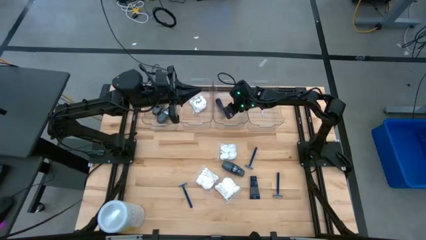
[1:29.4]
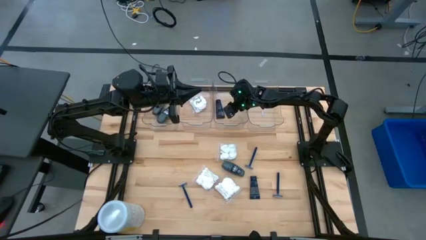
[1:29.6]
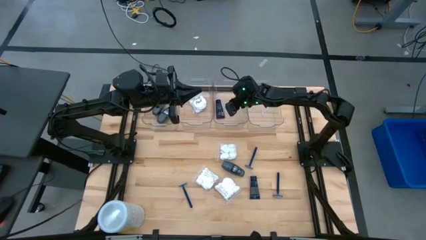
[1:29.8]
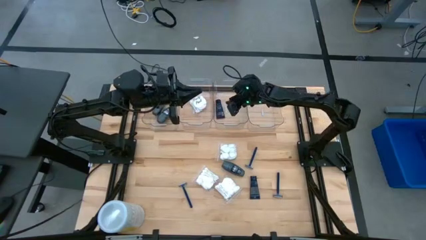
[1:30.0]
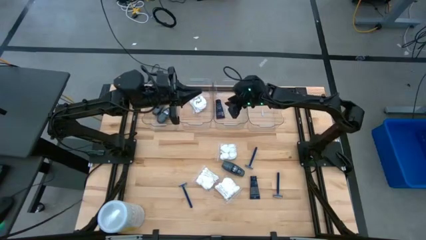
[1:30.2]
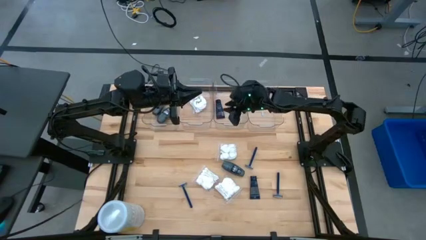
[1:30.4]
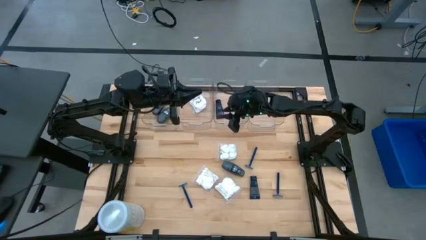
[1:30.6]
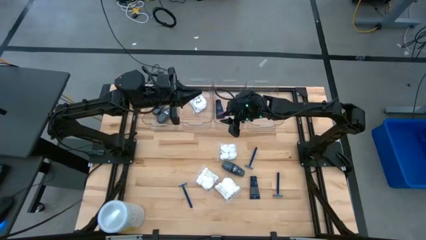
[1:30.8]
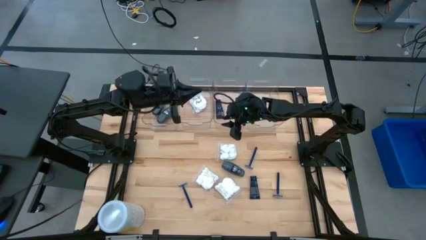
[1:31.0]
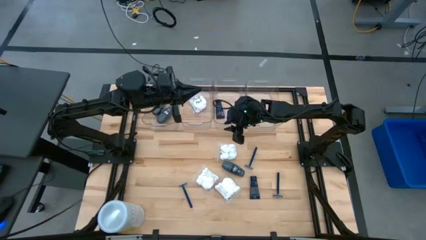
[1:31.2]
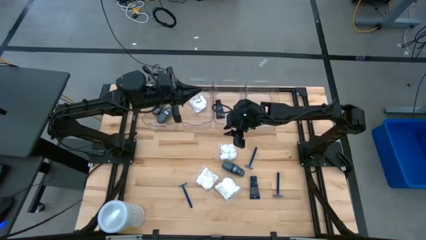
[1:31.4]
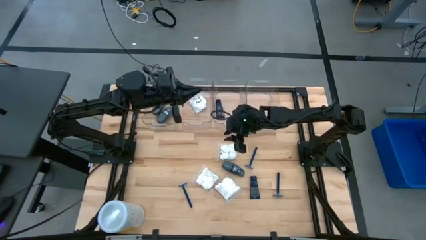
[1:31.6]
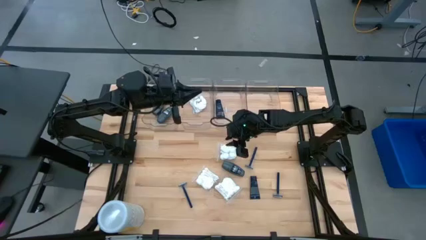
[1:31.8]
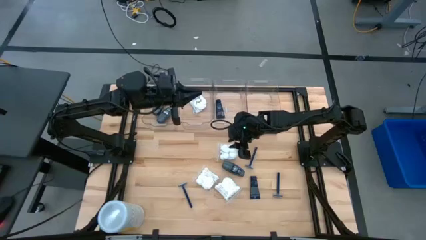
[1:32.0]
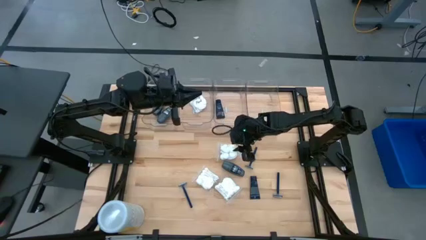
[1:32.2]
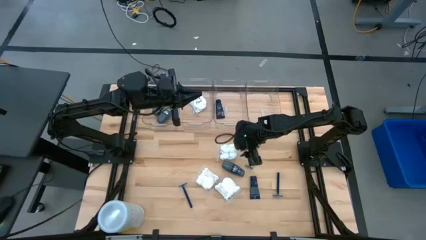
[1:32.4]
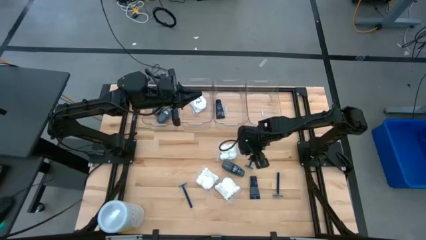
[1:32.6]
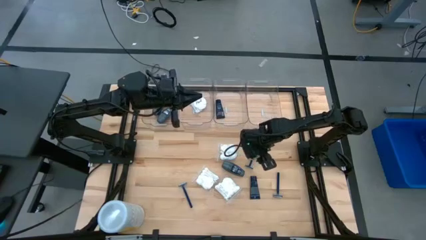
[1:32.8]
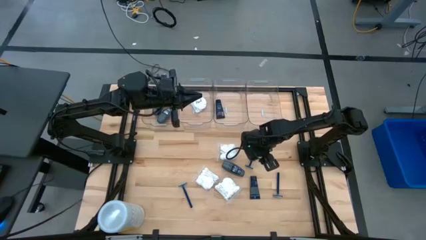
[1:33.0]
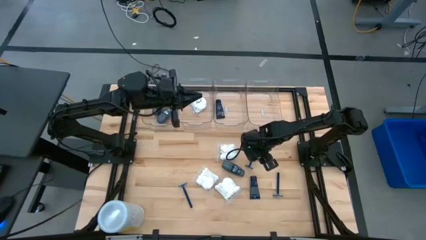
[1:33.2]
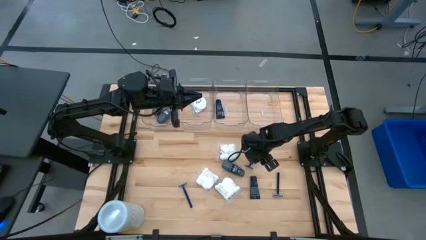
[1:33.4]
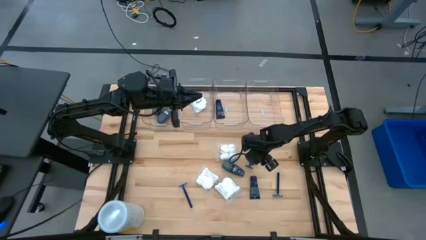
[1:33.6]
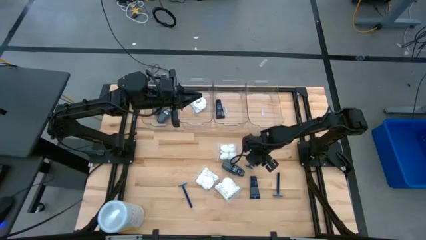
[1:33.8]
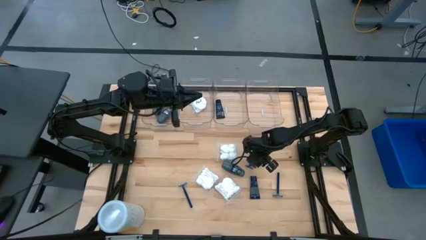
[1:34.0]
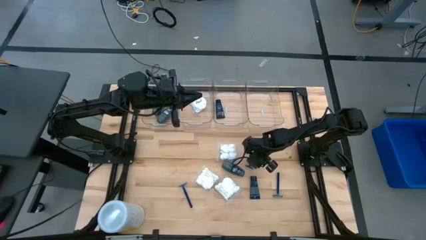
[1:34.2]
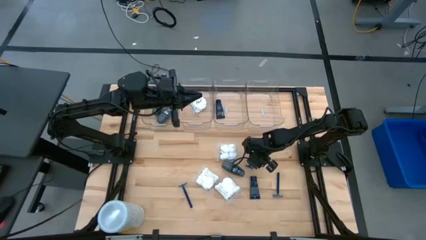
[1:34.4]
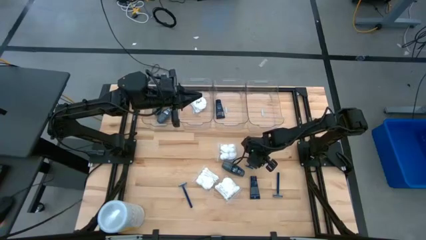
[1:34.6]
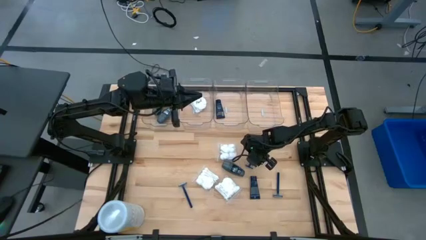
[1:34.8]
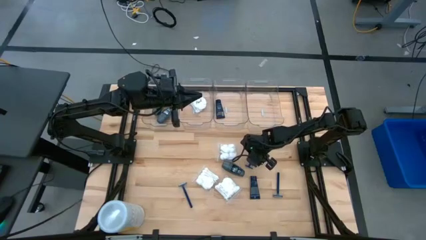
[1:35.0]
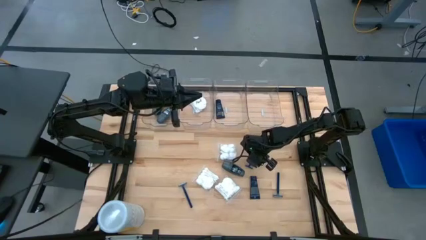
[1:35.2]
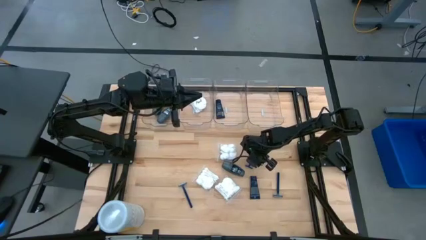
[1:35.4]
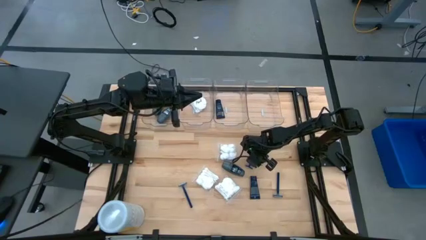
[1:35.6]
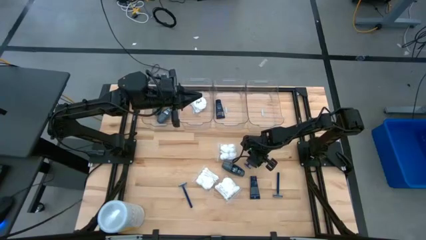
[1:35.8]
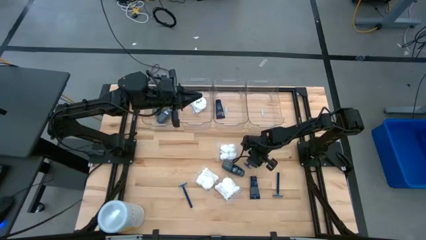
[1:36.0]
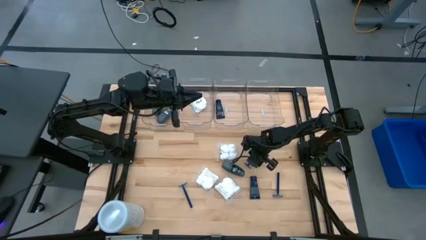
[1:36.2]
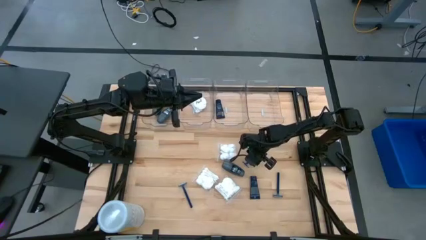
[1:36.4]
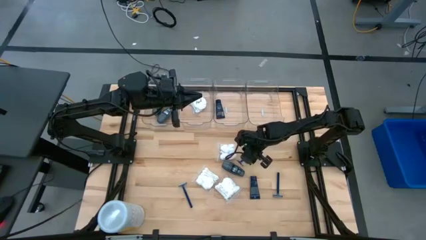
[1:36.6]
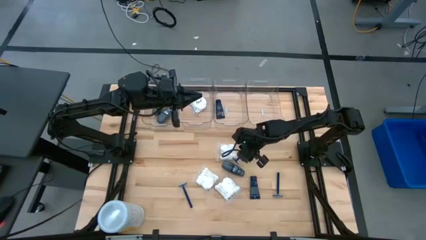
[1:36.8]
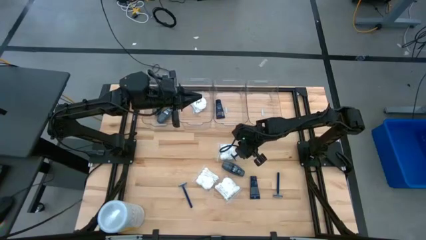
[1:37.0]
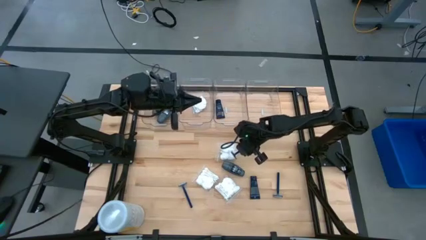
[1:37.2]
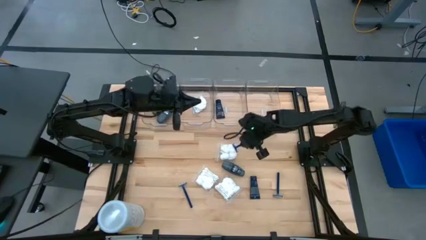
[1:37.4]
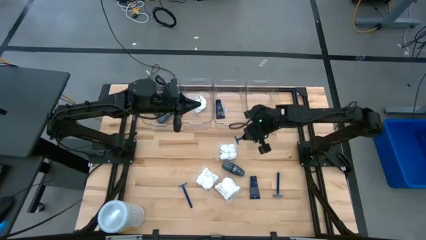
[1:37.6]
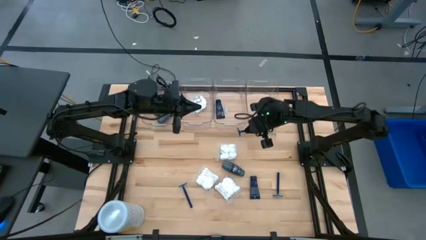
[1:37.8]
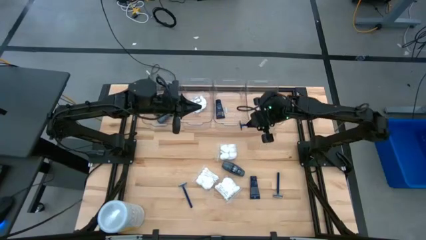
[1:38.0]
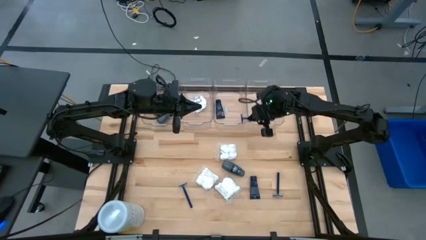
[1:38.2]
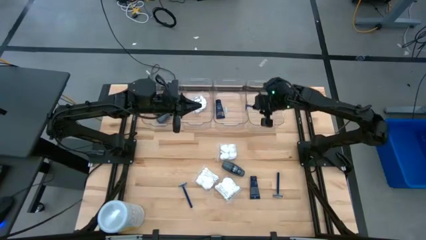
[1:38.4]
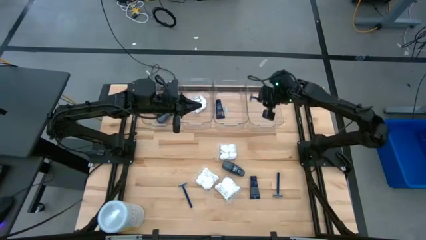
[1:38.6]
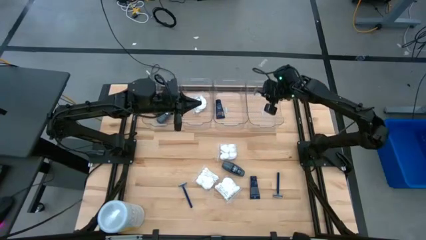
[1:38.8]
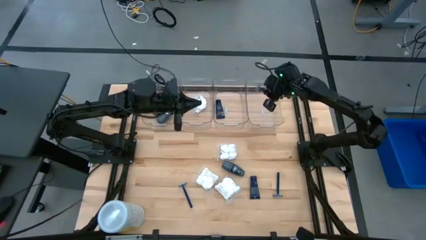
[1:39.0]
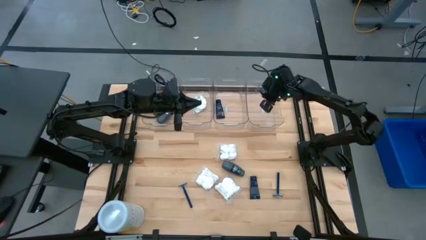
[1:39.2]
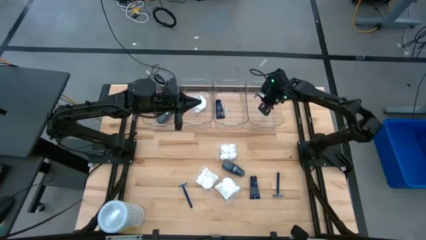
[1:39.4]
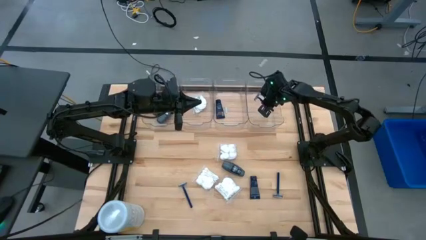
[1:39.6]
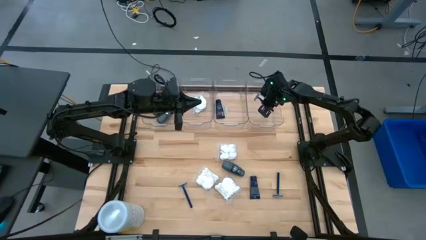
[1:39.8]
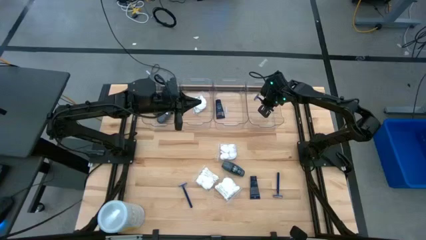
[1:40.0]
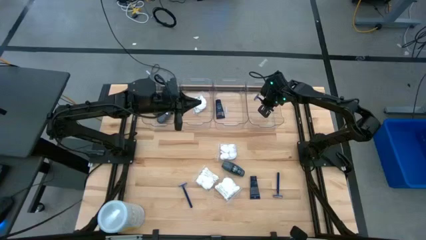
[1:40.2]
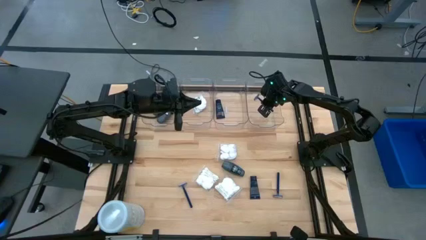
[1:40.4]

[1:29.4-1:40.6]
Task: Pick & Place Travel size toiletries
Put the top blue razor into the right transparent bin

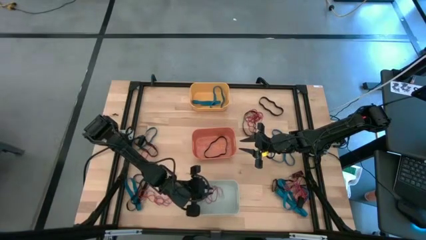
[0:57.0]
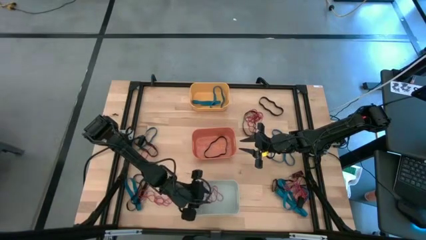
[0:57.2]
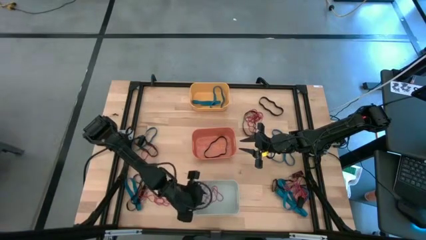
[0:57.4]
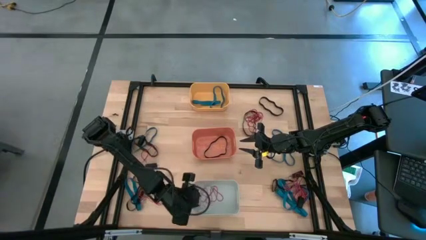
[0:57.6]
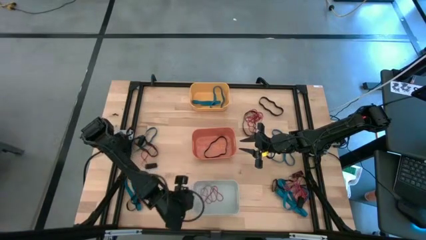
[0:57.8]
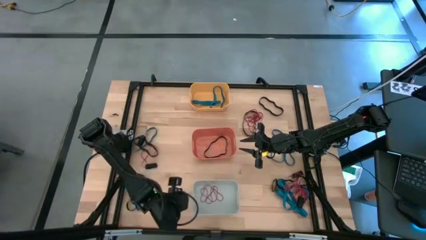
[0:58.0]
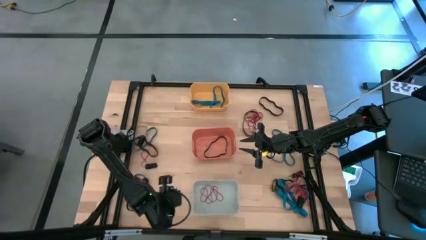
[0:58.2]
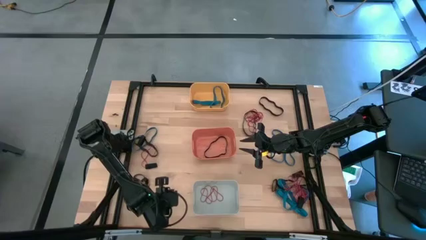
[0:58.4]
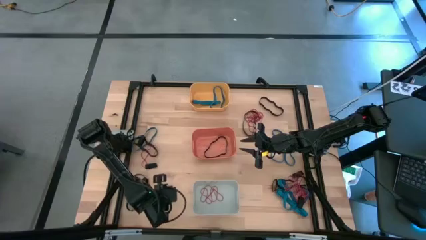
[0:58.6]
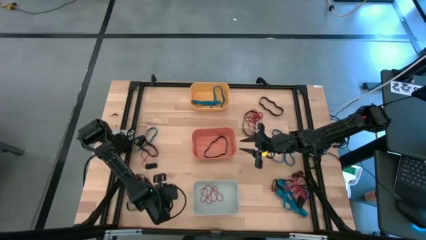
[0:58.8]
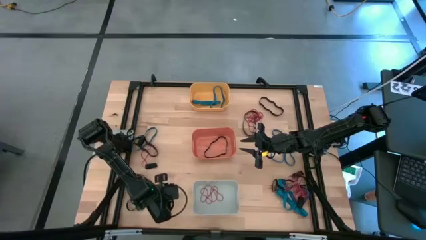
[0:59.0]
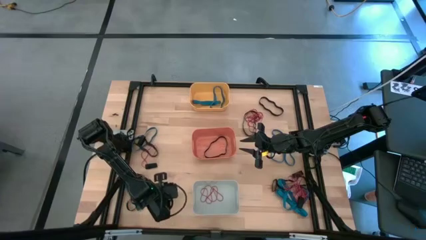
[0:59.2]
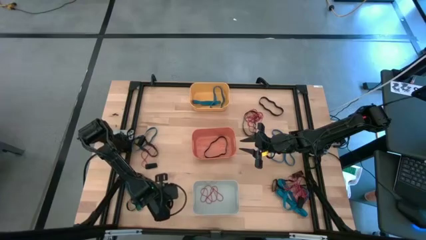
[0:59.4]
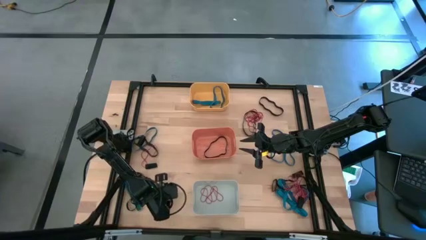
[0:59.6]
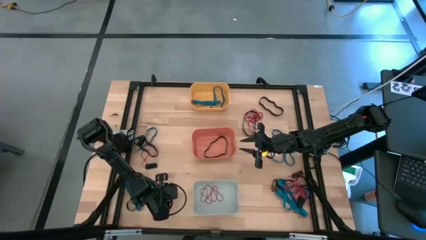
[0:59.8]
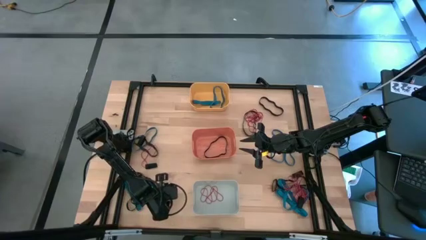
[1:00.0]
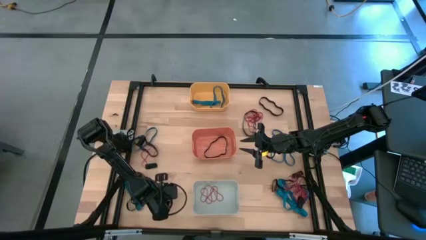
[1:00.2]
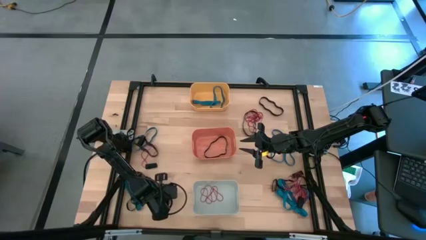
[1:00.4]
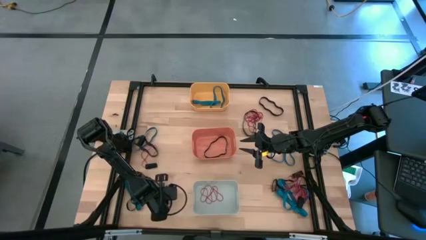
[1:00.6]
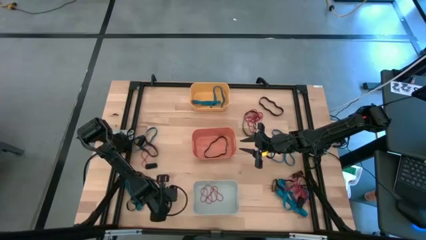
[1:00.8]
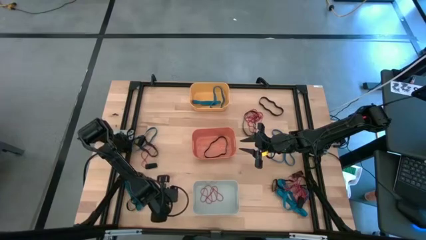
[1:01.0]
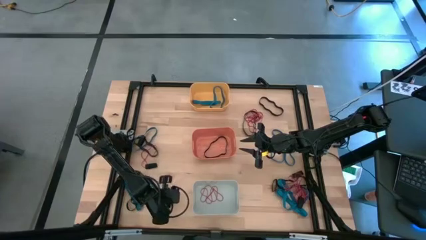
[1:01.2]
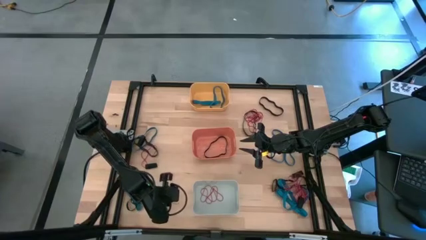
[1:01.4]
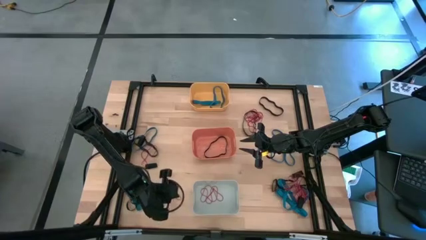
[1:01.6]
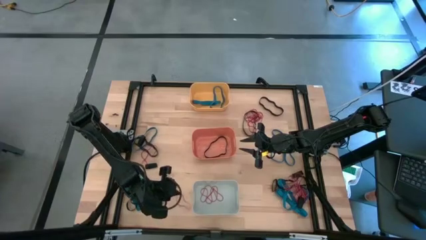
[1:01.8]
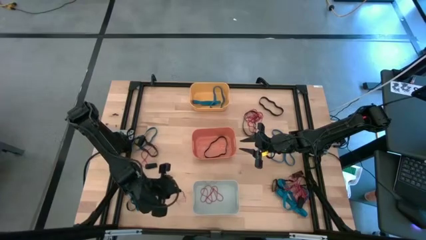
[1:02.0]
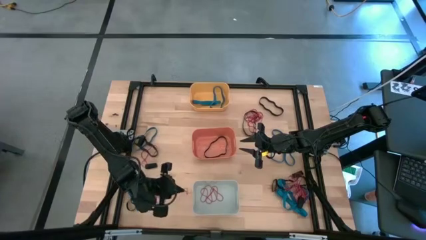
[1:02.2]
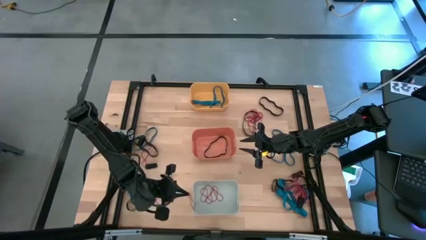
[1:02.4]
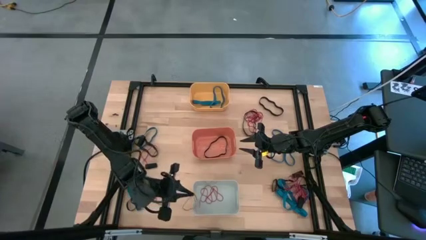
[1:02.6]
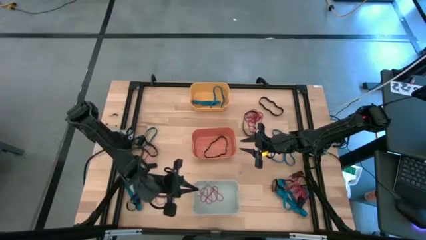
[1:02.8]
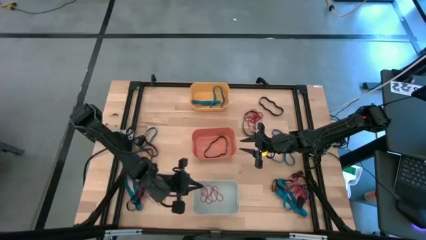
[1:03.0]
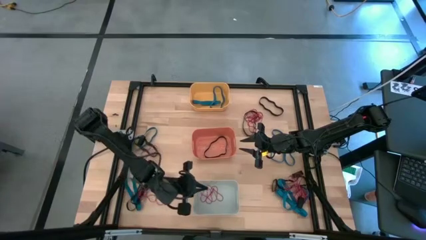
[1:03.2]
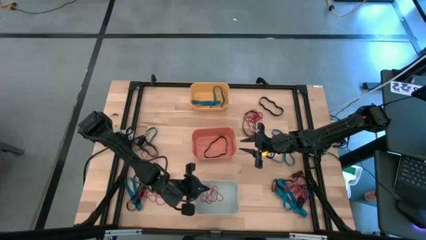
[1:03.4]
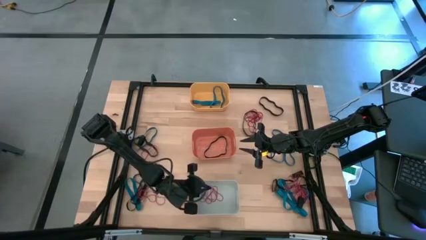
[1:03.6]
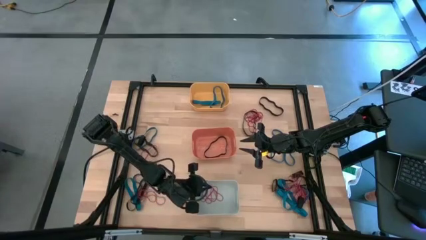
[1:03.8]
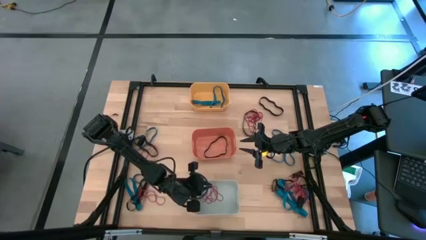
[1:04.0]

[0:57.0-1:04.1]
Task: Sort rubber bands into baskets
Put the red rubber band in the white bin
